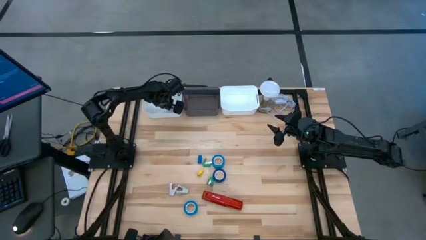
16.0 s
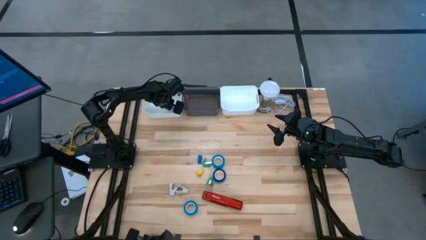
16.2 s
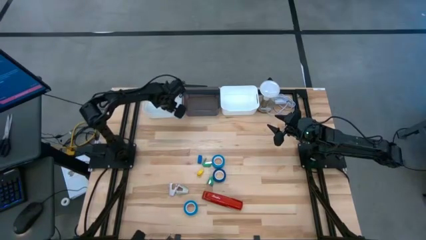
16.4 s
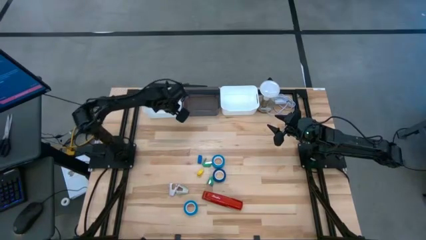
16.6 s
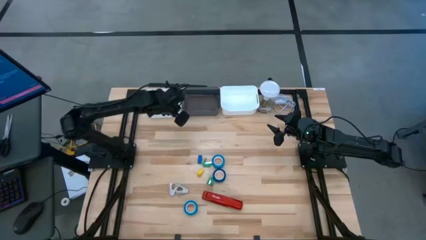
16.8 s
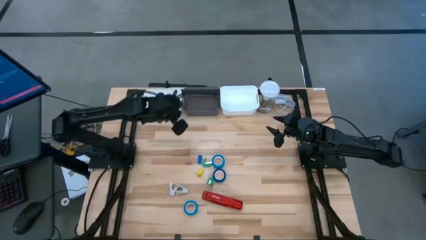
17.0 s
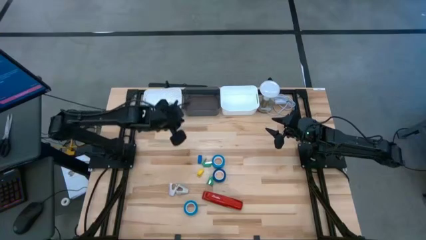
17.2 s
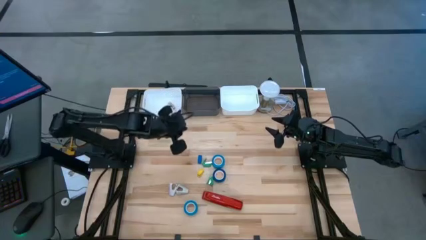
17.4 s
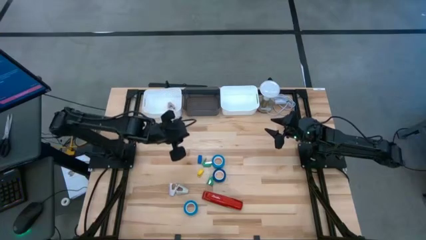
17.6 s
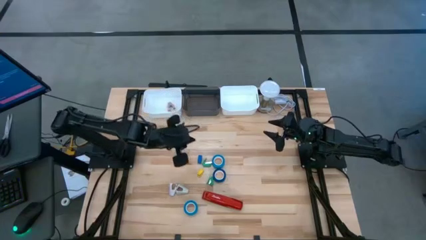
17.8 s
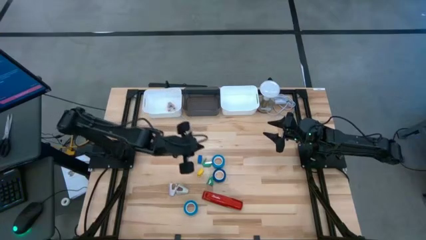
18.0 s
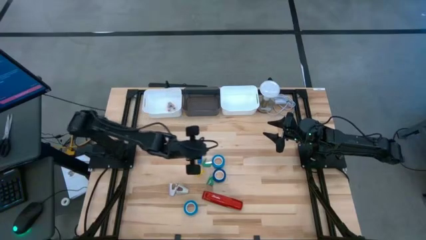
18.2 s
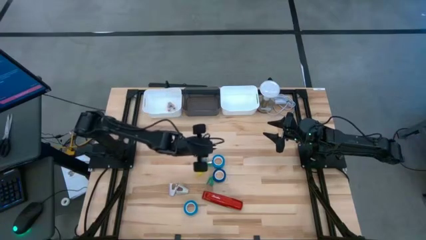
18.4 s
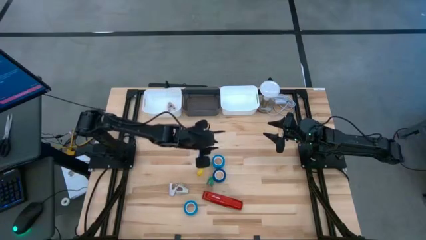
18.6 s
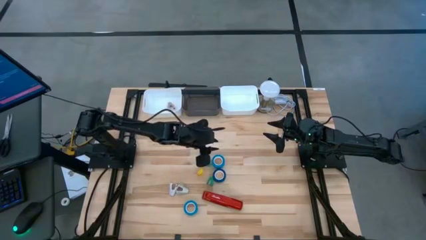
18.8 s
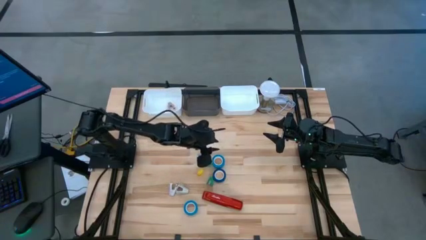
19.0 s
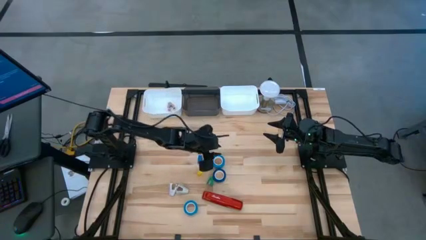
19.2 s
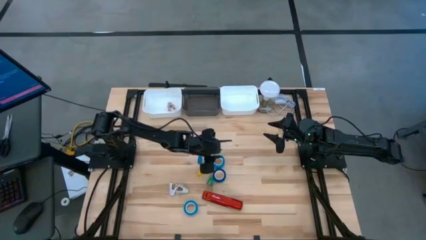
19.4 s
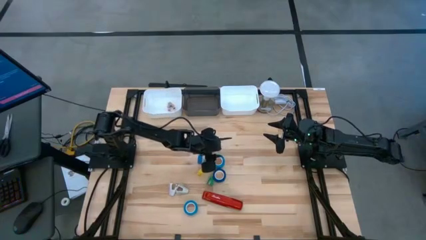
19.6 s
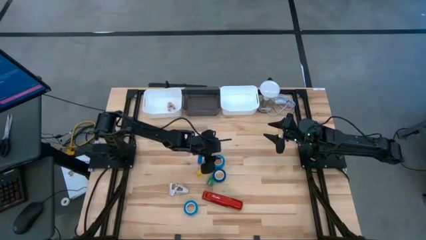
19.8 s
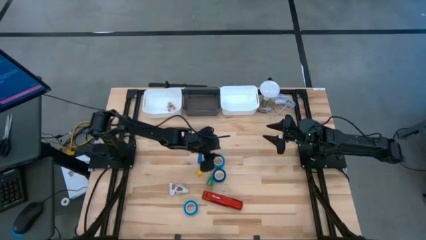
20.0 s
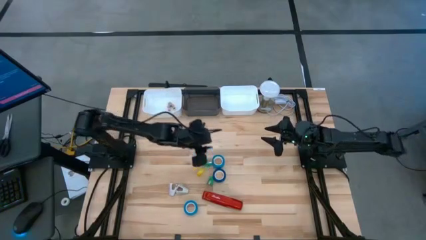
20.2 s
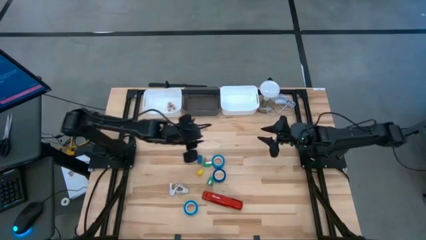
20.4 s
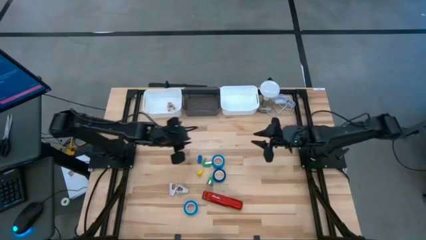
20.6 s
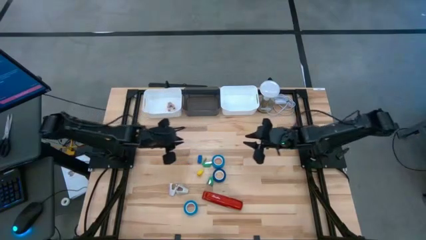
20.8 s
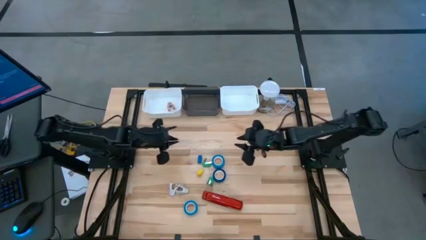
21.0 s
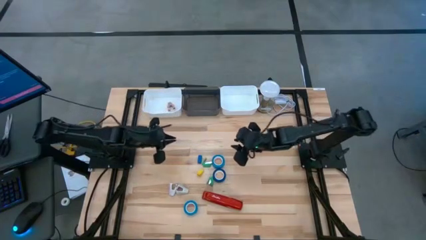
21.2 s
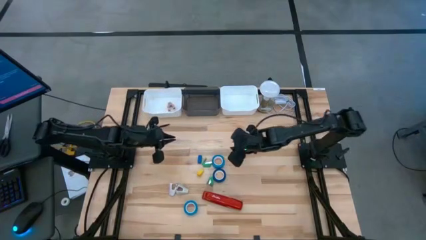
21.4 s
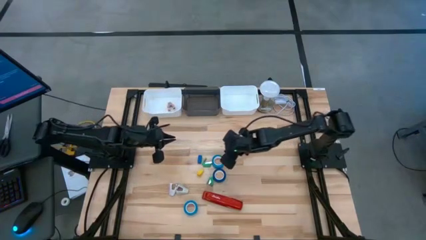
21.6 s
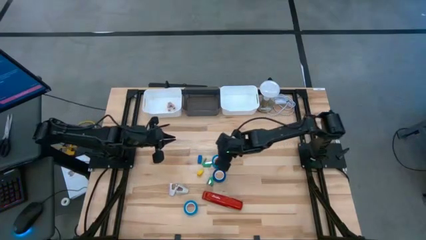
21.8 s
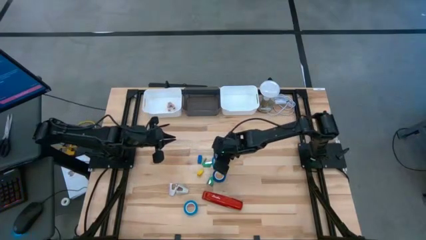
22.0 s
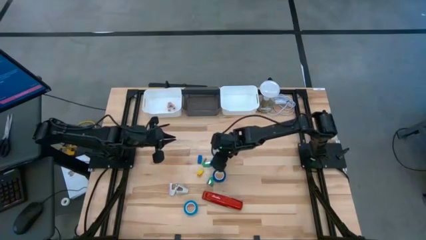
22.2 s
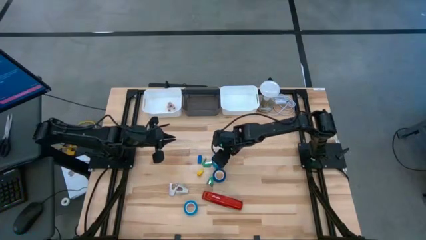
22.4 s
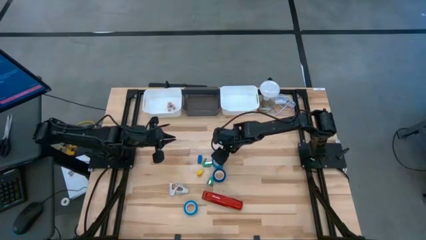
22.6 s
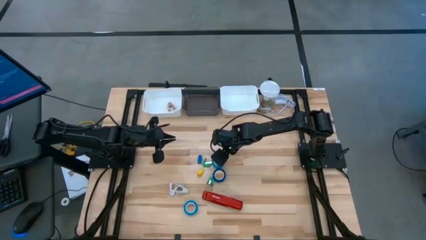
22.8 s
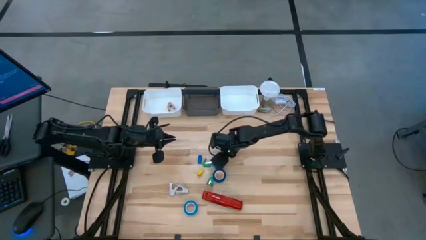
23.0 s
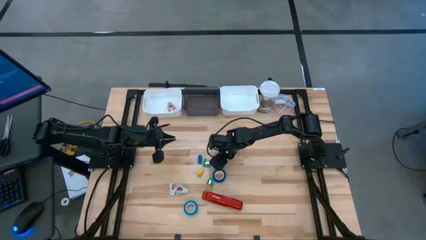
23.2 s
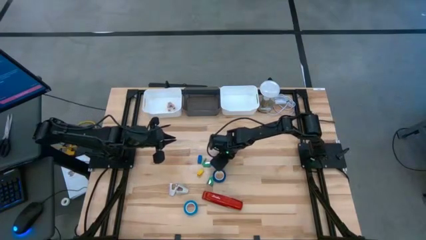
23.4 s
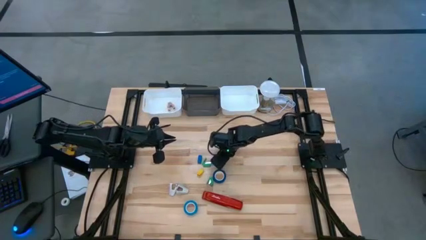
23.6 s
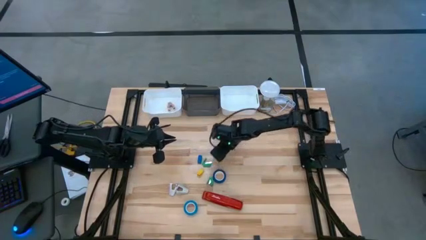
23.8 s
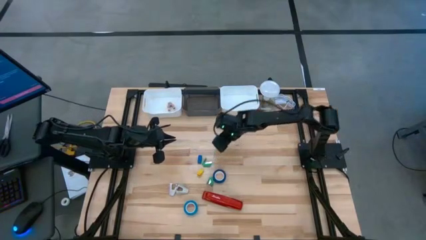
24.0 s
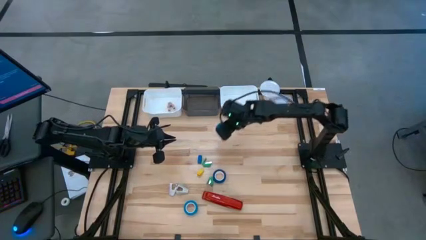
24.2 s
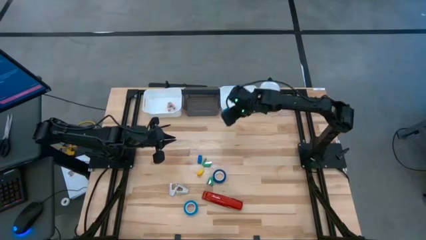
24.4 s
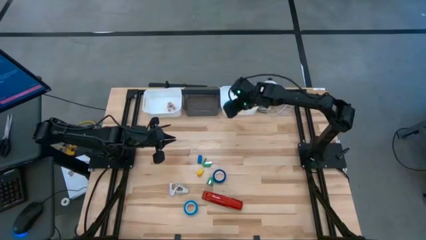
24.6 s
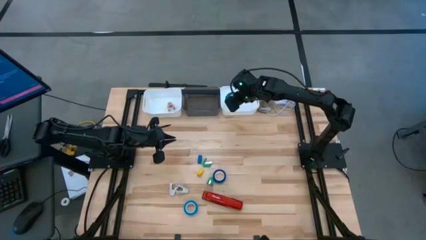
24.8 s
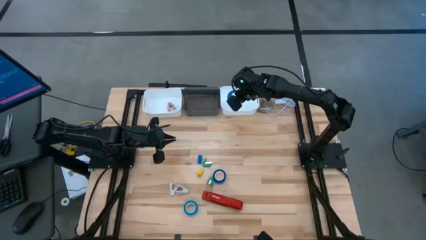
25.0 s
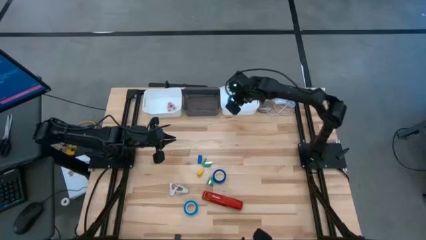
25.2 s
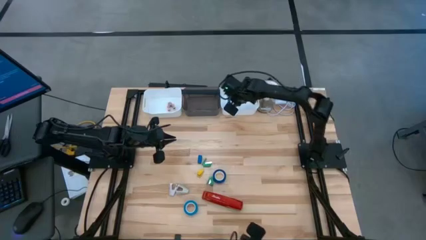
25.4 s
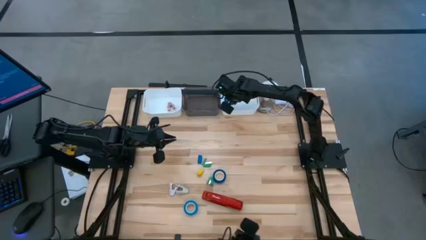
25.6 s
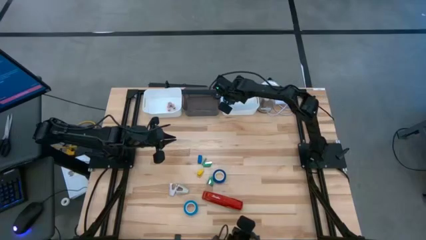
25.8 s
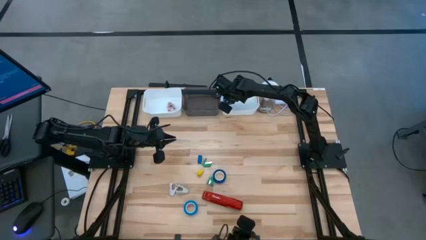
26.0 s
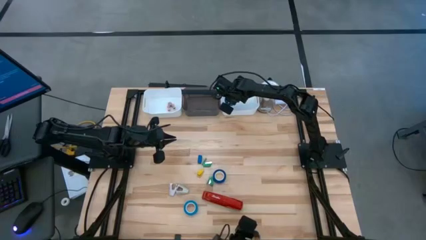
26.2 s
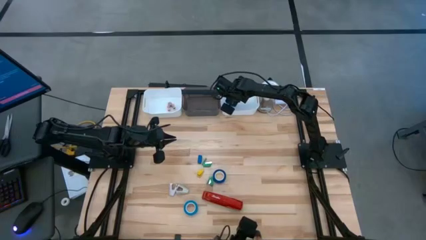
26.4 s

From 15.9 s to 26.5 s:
Task: Pick and place Stapler, Stapler remover, tape
Put the top light blue tape into the right white bin

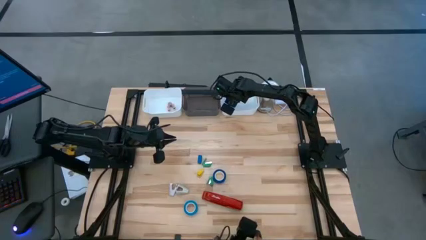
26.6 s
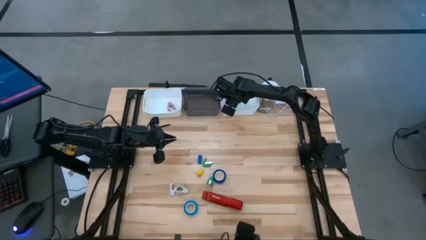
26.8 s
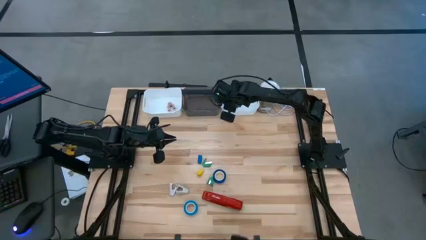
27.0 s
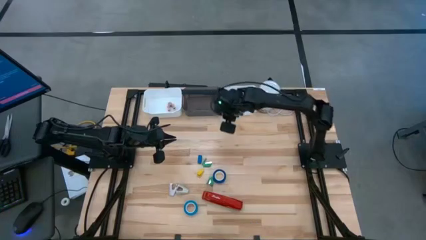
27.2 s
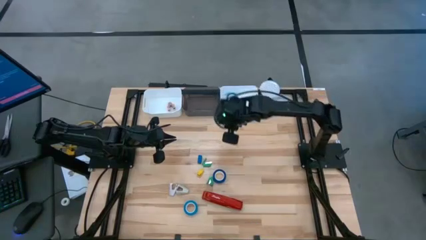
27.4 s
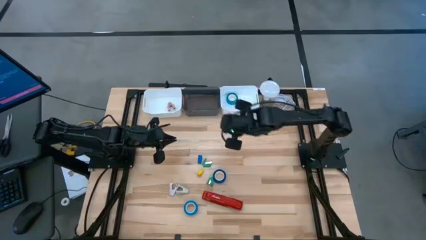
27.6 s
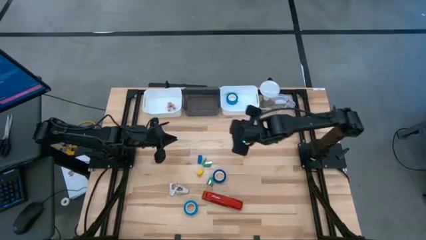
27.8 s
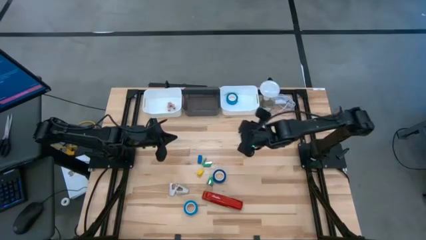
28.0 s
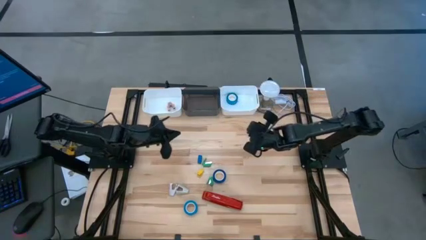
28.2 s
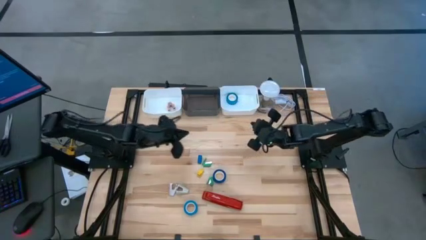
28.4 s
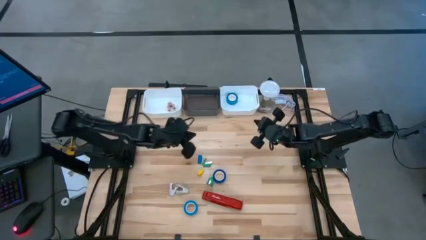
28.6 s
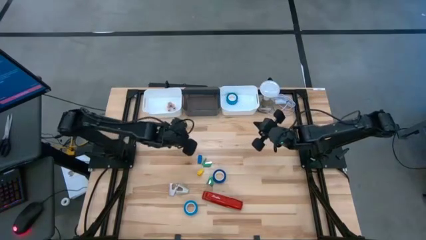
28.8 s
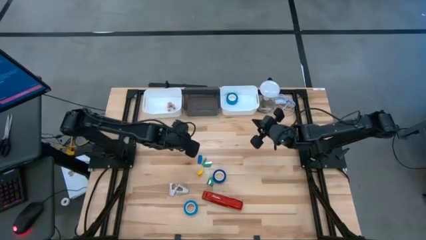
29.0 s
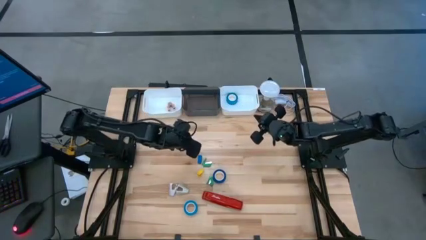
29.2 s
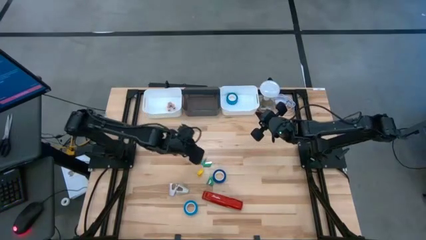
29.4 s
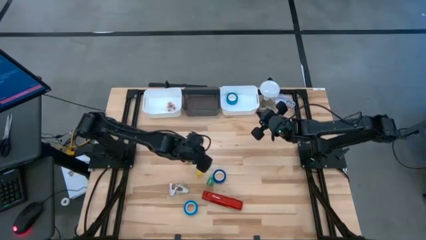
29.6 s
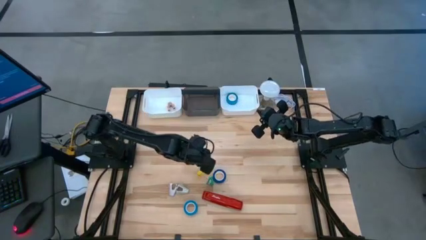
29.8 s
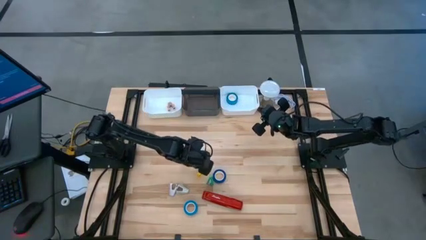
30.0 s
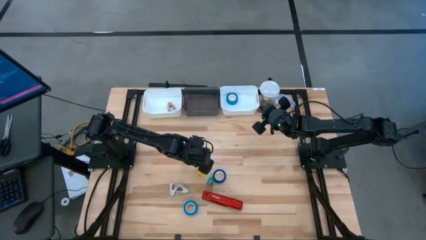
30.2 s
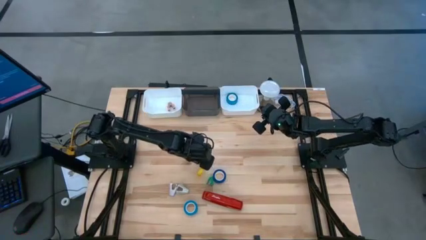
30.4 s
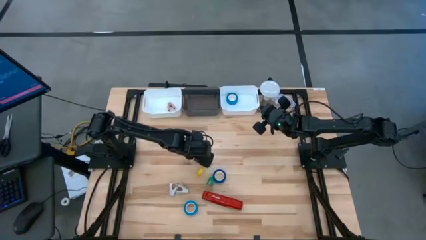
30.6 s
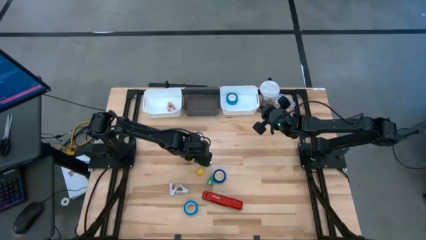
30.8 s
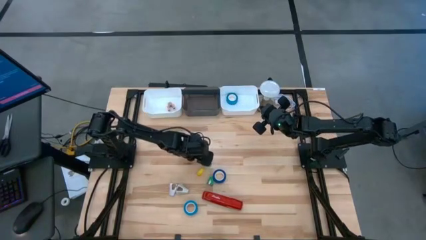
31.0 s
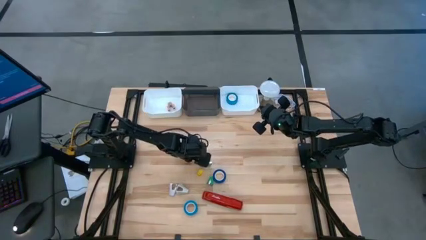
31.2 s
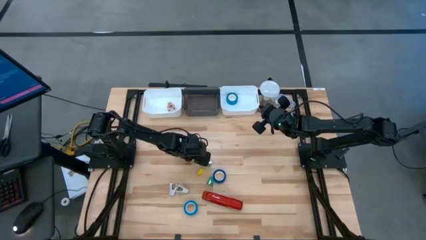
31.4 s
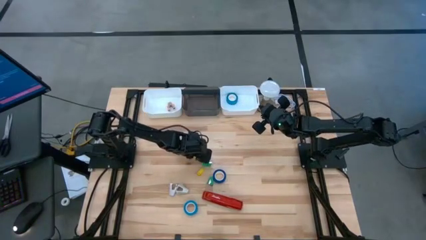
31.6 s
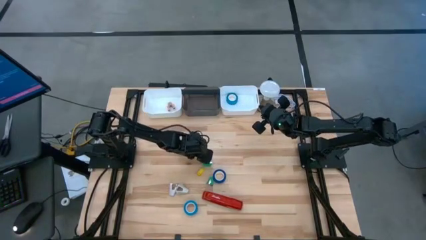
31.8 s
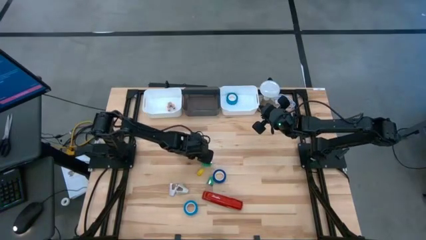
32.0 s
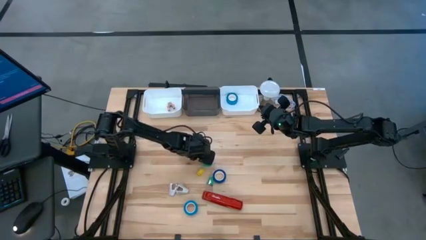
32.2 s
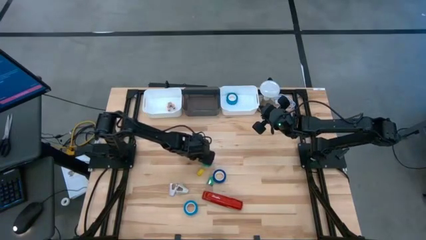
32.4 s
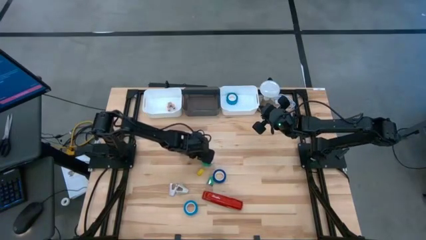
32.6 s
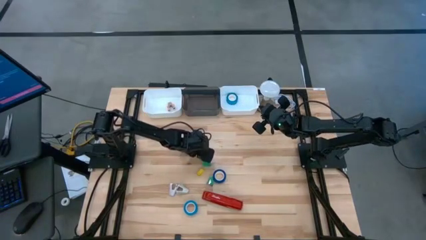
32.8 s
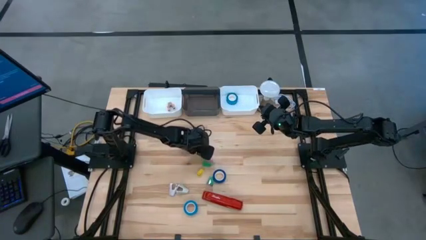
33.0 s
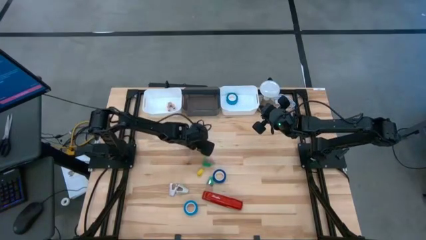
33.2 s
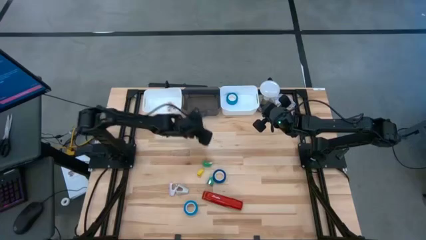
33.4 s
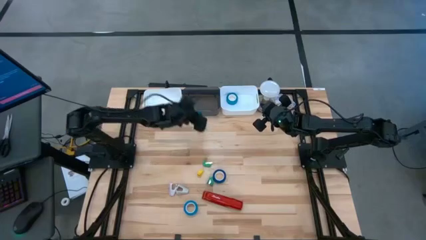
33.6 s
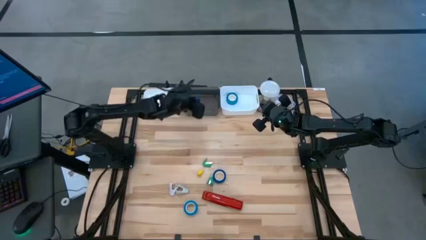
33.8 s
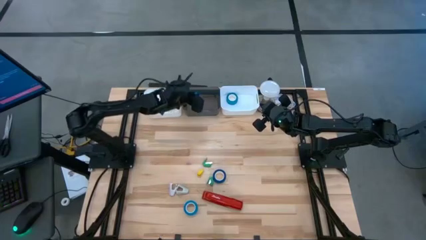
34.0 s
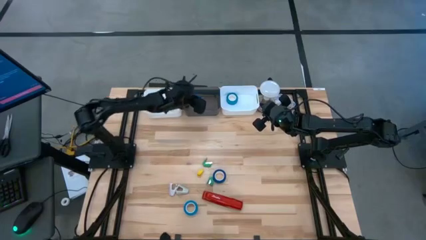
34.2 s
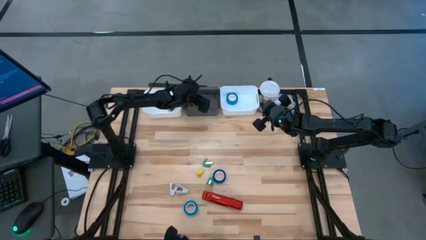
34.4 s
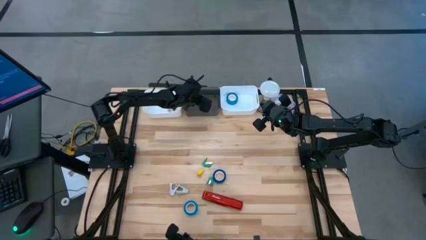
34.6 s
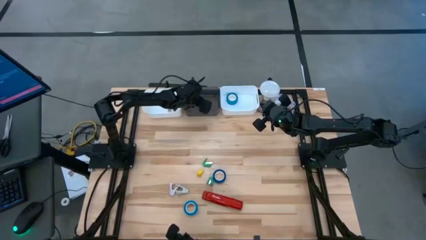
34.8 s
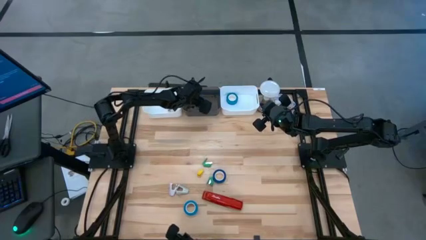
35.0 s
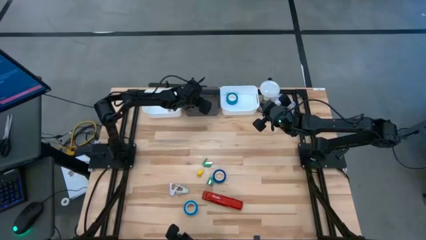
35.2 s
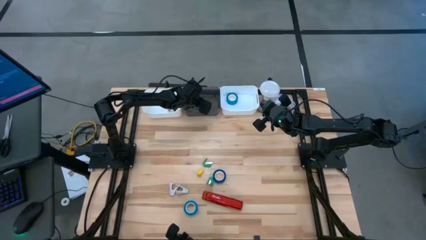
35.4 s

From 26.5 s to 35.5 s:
Put the blue stapler into the black bin
